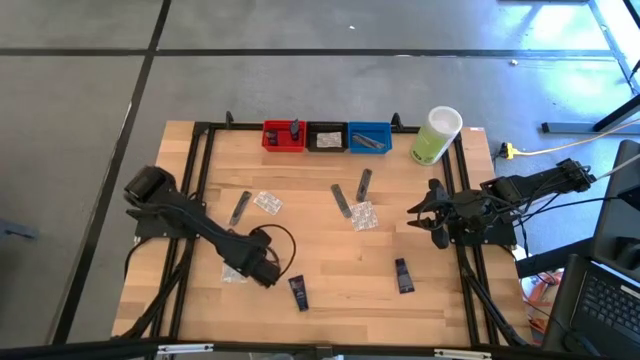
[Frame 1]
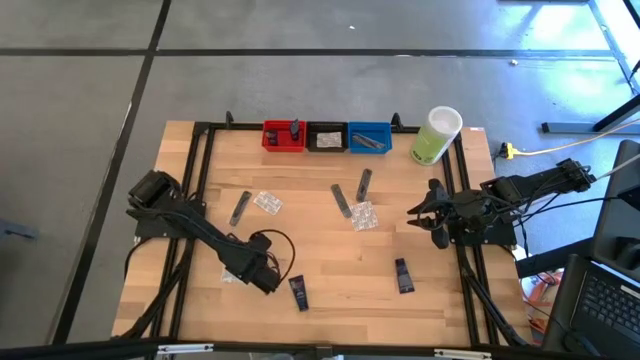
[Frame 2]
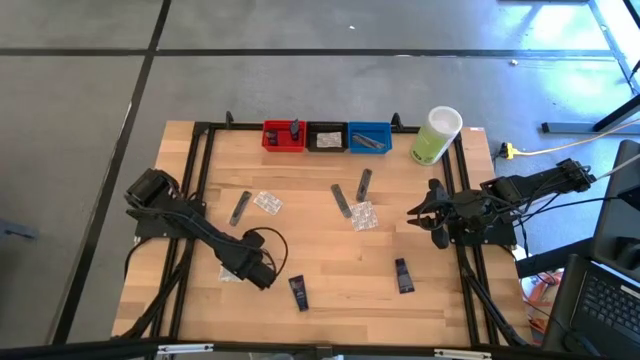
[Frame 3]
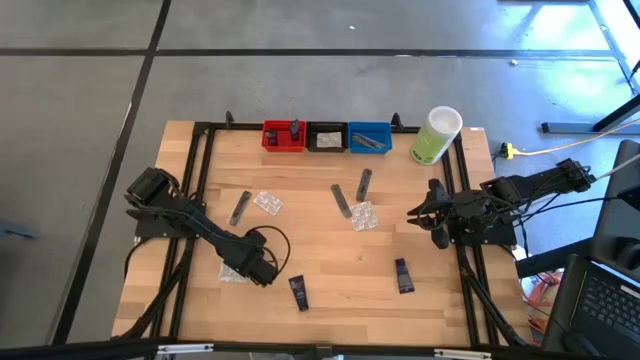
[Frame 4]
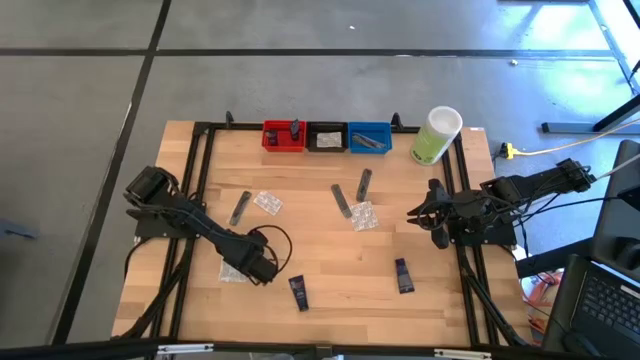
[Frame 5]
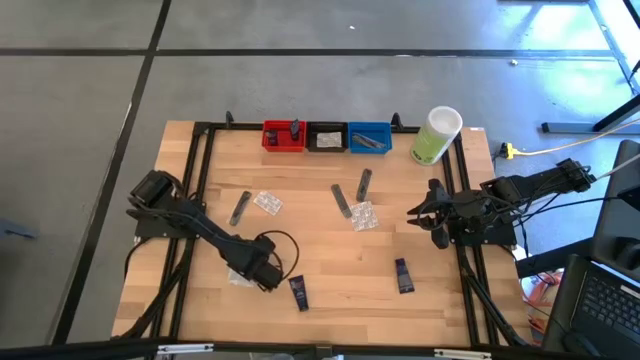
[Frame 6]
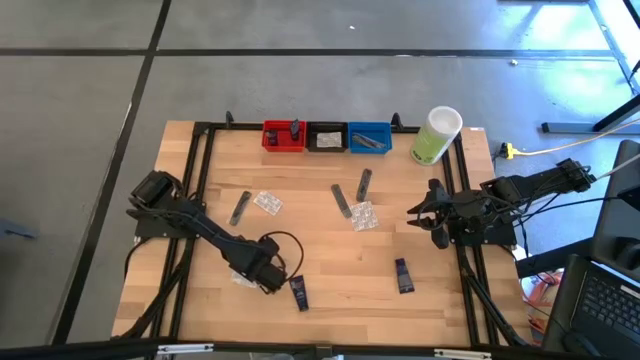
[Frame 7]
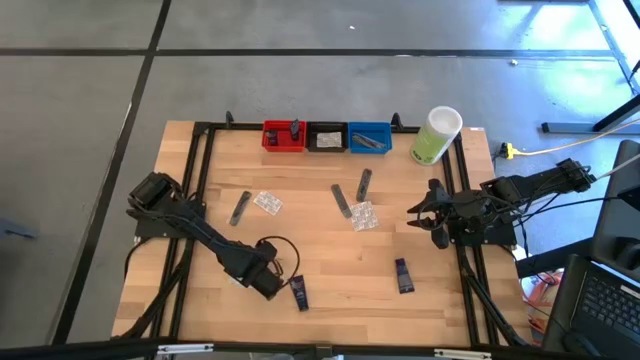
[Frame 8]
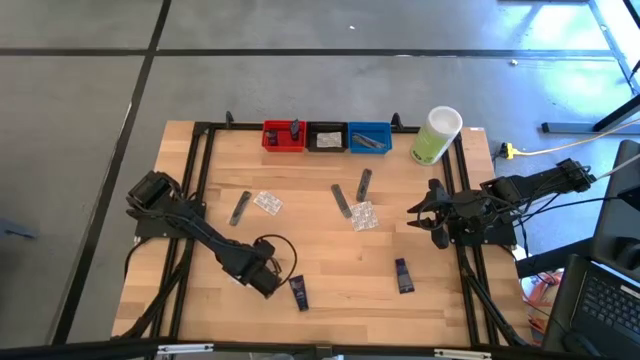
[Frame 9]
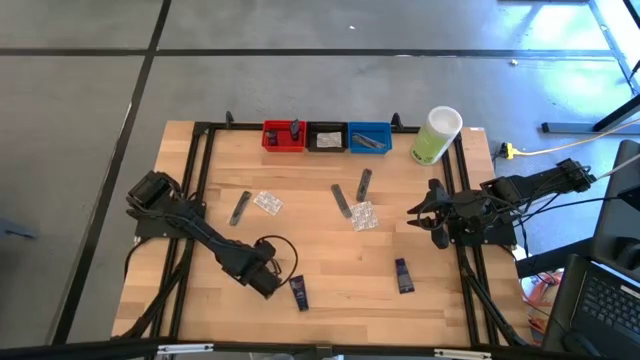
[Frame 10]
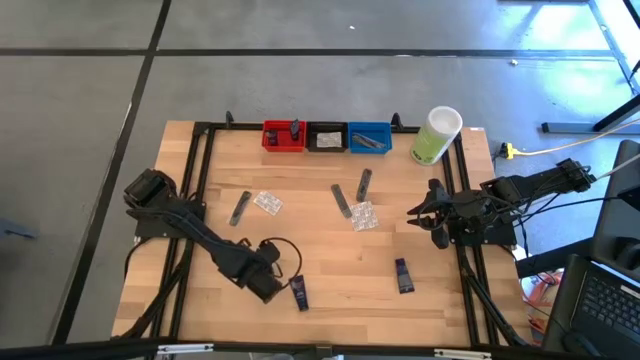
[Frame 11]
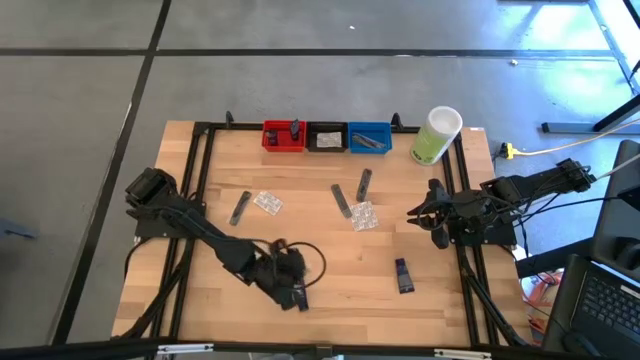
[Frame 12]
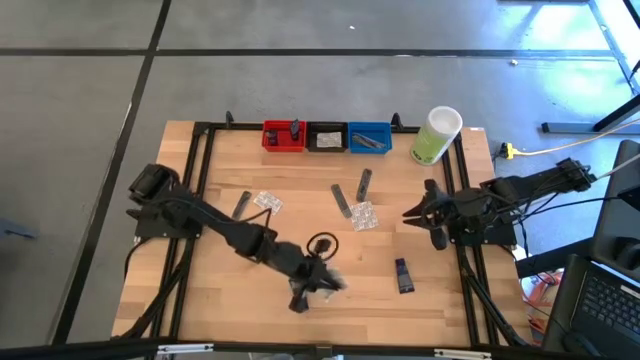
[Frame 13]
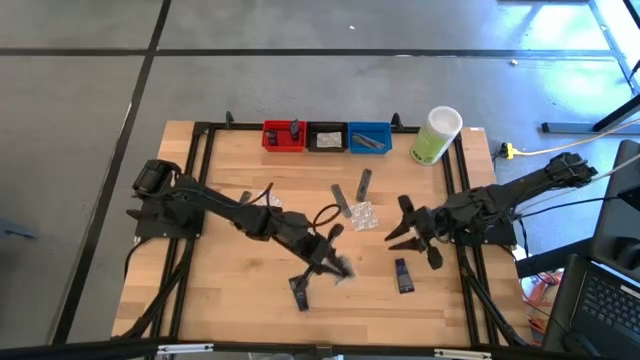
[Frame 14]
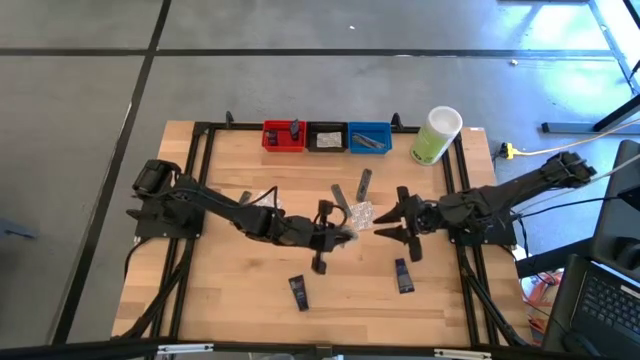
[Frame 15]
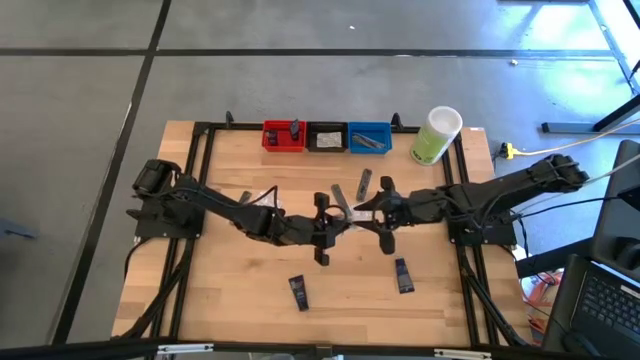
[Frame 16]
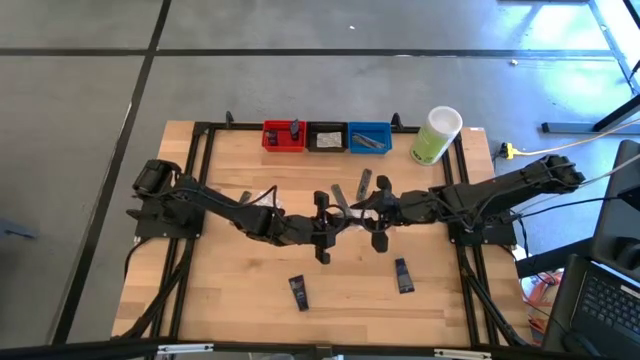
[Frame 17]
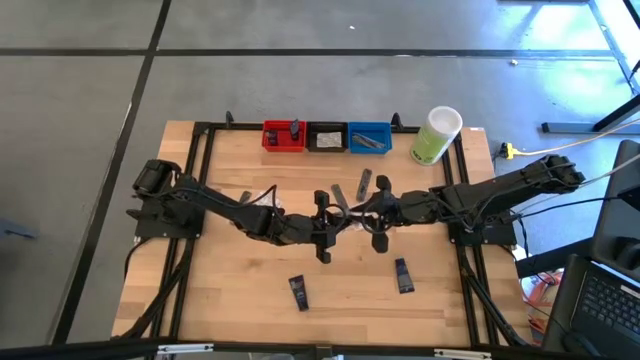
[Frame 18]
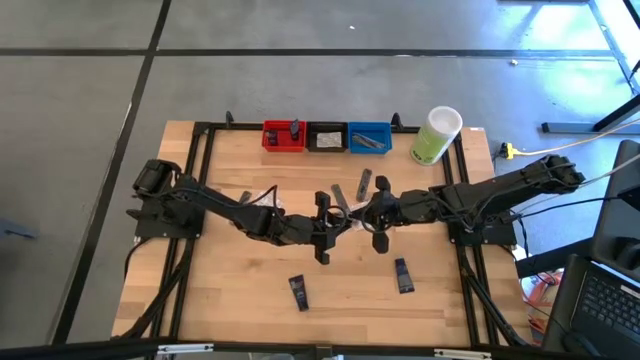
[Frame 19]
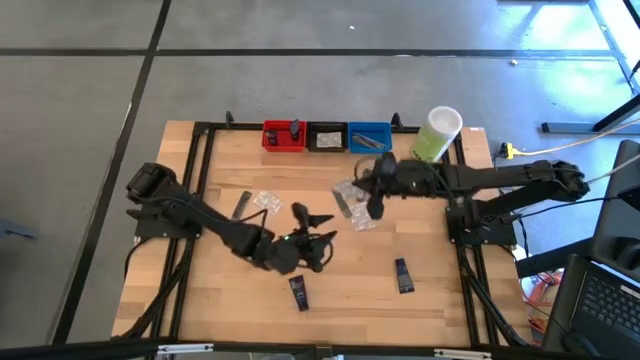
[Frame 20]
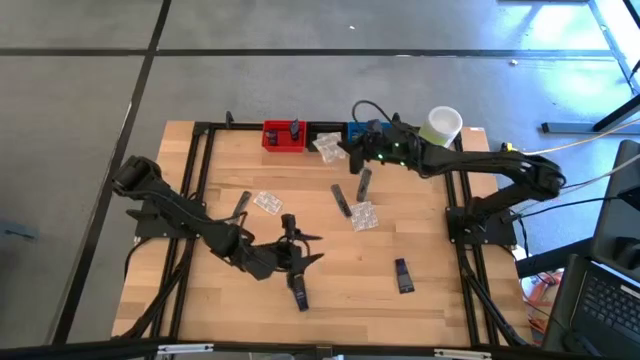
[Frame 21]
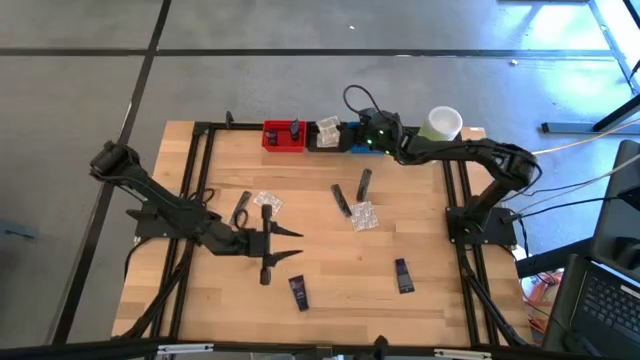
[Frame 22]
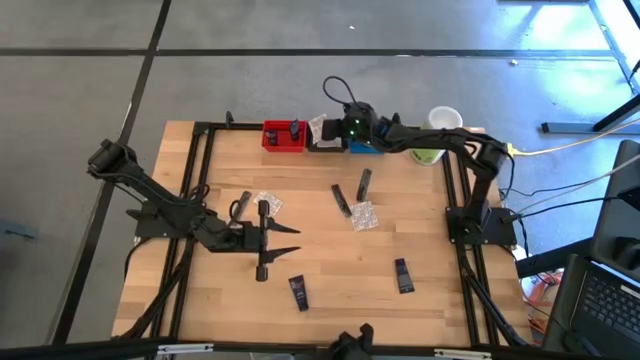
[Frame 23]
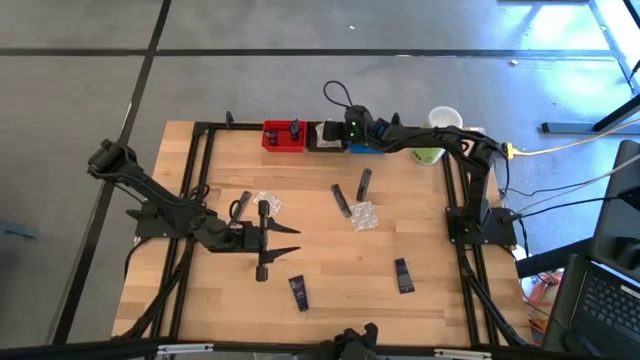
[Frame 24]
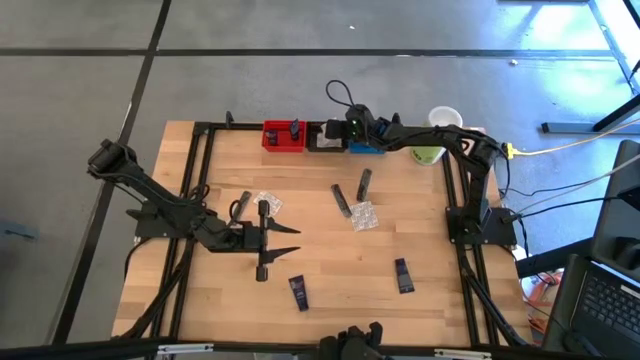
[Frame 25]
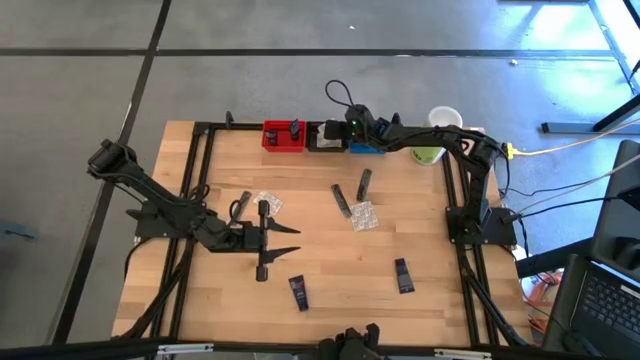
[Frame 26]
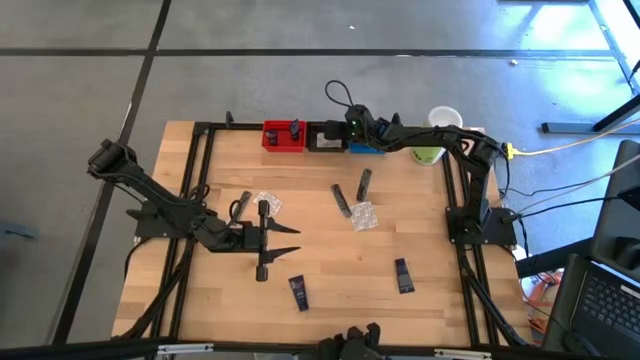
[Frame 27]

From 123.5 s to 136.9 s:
Task: Pick & Place Travel size toiletries
Put the white bandage pack into the black bin

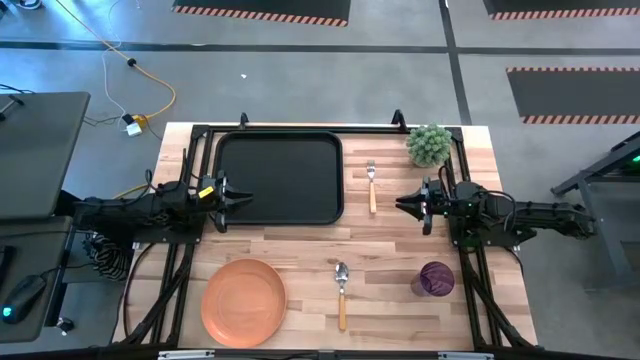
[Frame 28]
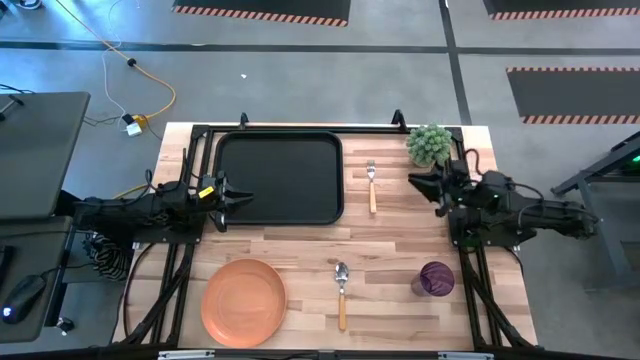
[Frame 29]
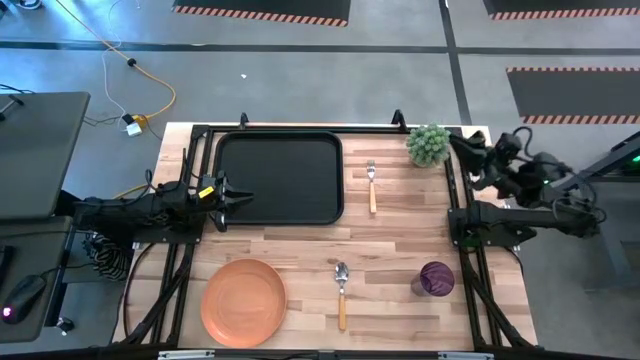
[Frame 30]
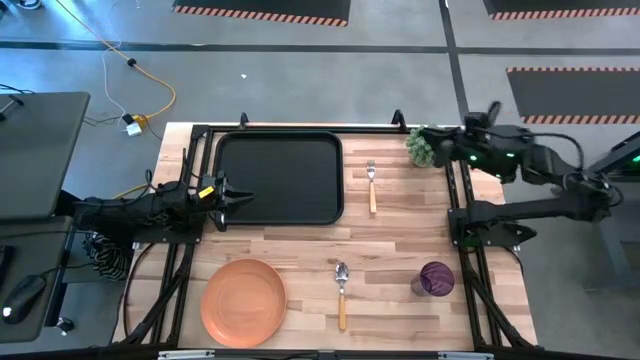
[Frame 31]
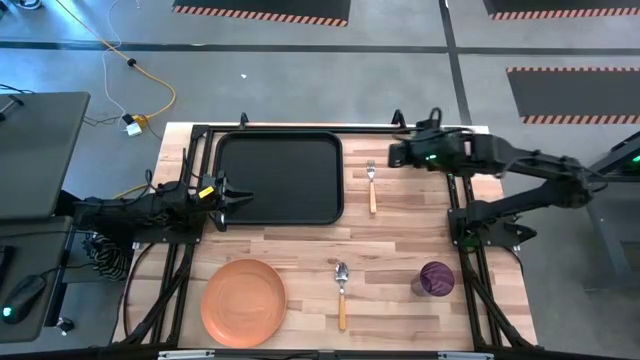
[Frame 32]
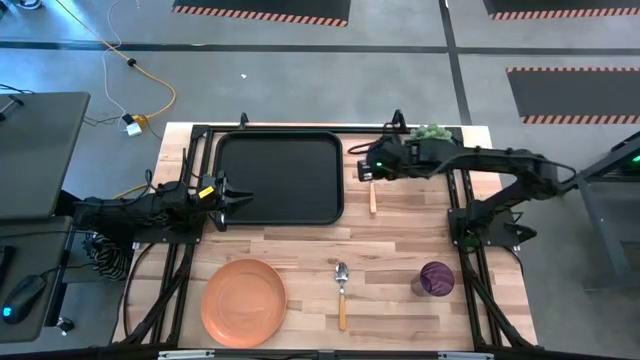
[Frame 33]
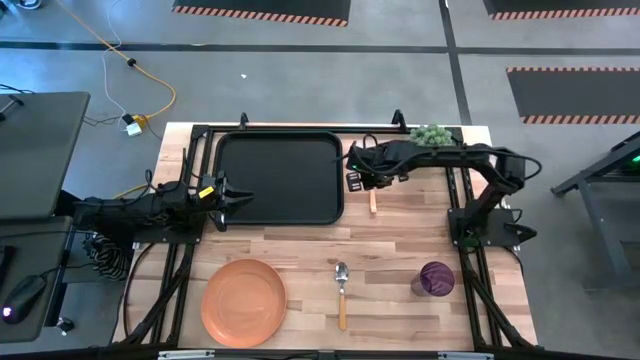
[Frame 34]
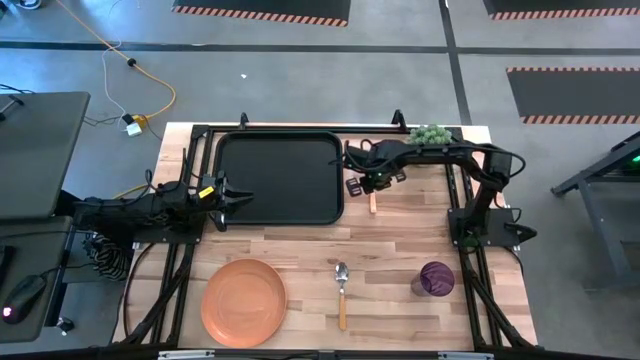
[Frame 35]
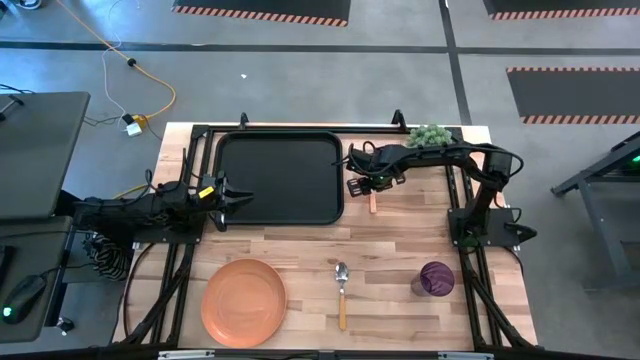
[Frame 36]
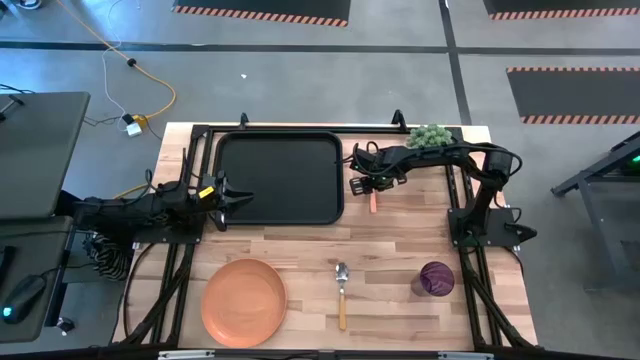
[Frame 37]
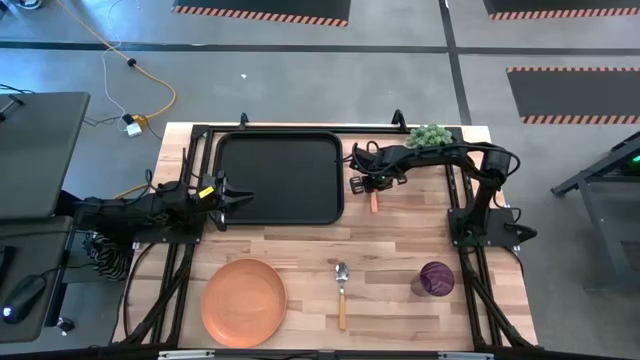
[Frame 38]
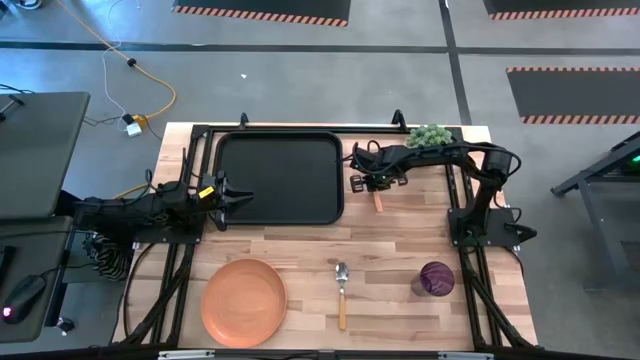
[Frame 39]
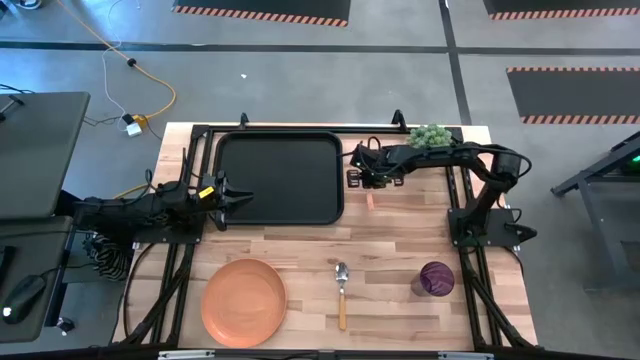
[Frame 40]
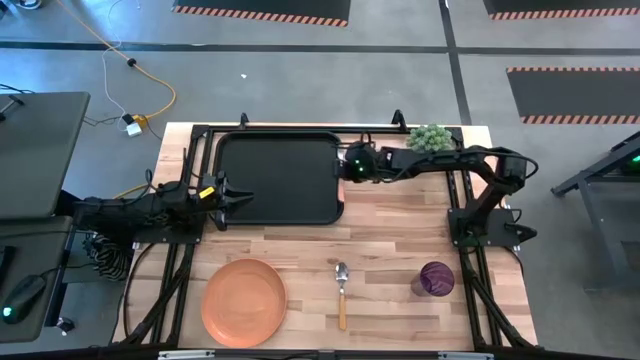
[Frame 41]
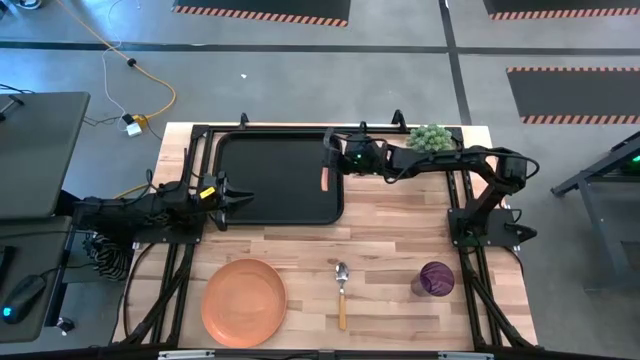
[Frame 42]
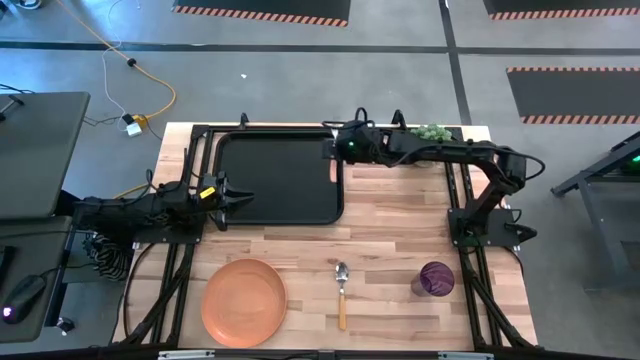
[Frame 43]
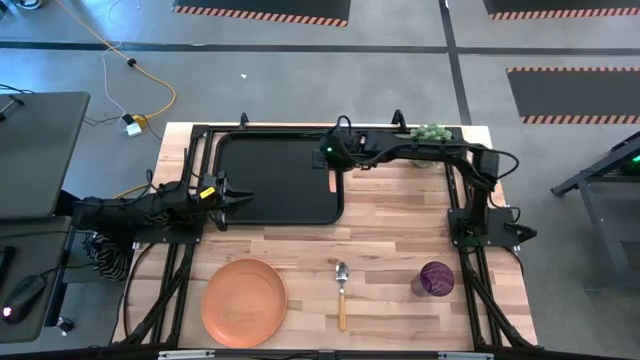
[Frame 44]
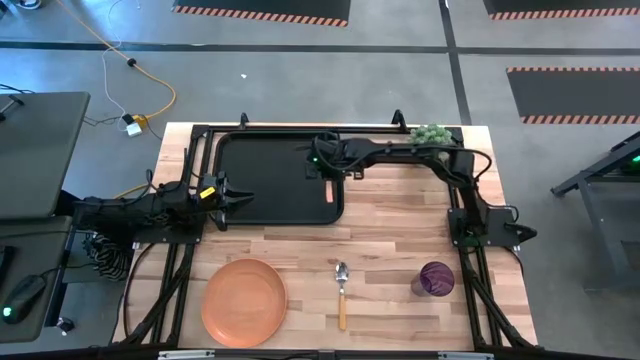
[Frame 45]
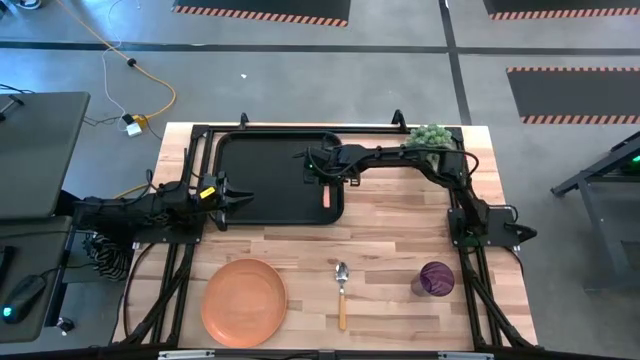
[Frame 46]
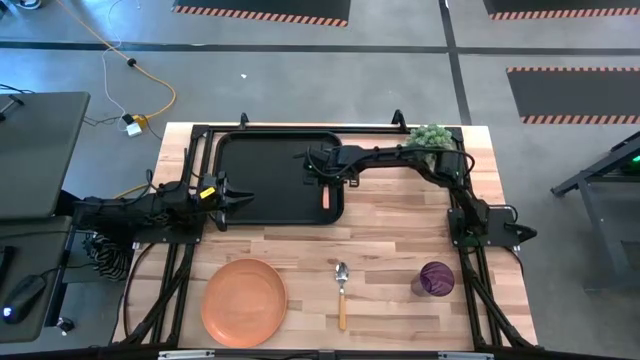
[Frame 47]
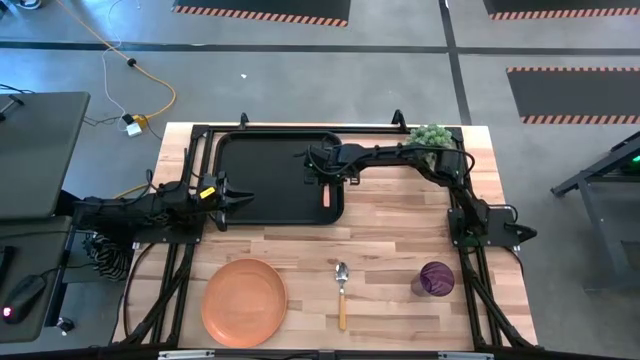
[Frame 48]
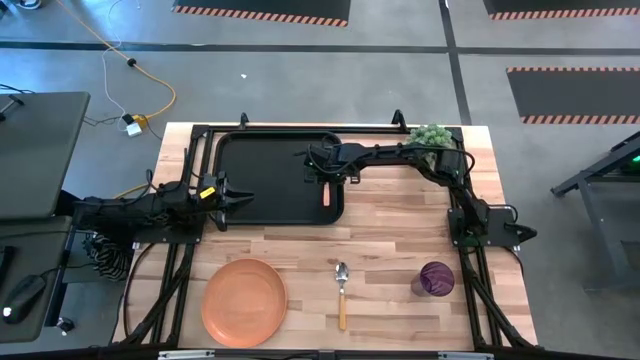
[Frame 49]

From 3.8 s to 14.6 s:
Task: Pick and place plate/cup/fork/spoon on tray
Put the light orange fork on the left of the black serving tray
